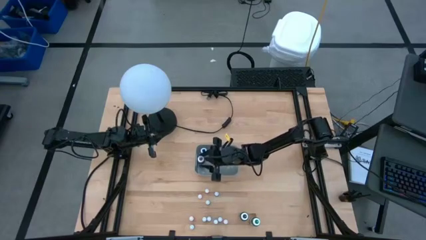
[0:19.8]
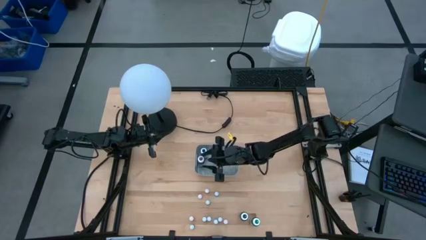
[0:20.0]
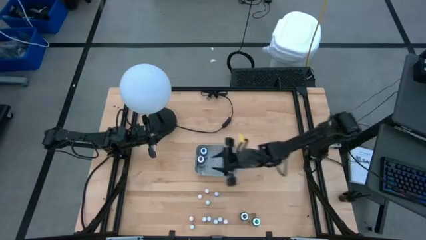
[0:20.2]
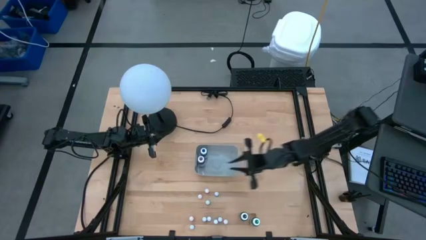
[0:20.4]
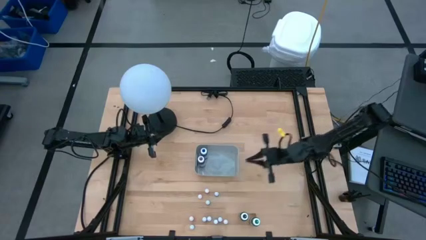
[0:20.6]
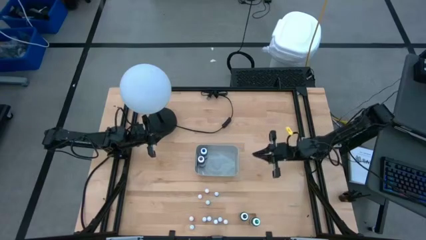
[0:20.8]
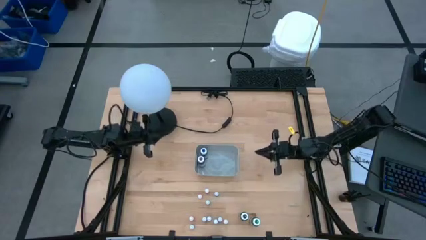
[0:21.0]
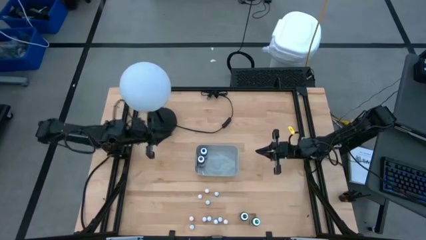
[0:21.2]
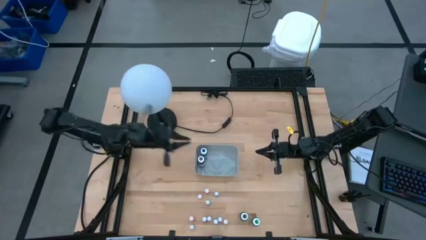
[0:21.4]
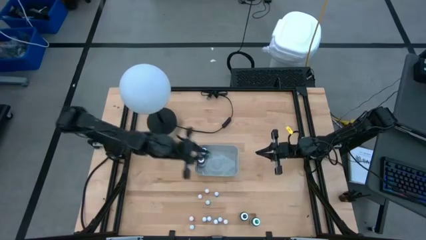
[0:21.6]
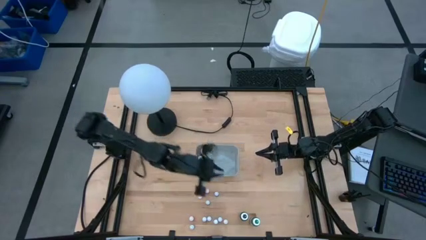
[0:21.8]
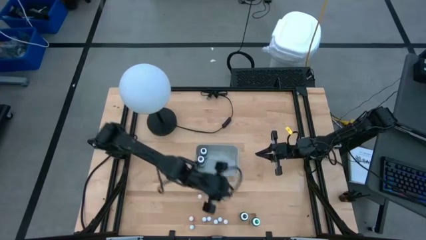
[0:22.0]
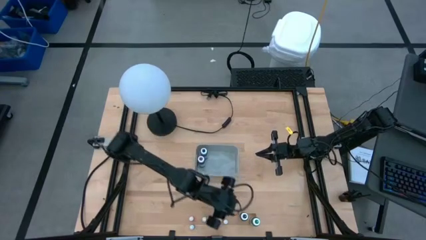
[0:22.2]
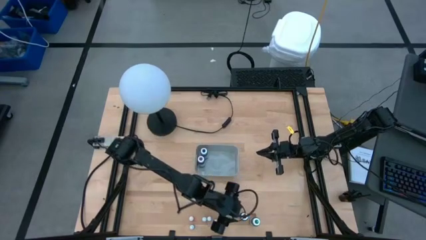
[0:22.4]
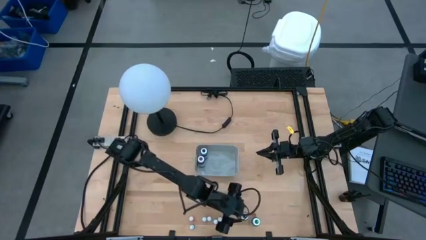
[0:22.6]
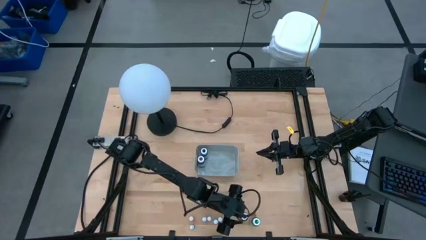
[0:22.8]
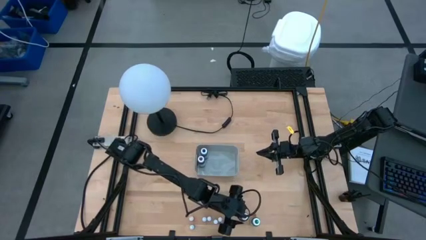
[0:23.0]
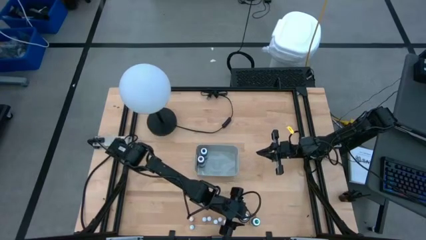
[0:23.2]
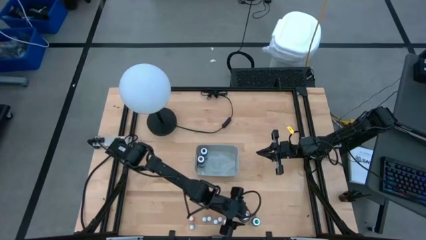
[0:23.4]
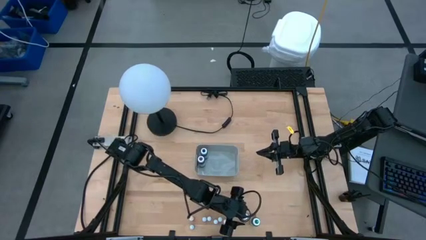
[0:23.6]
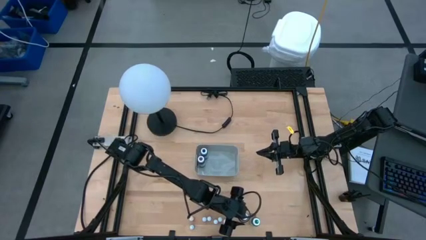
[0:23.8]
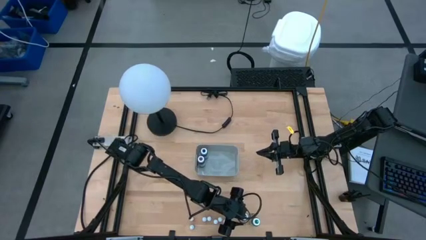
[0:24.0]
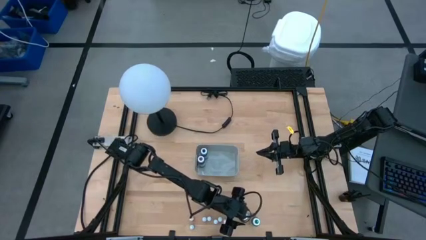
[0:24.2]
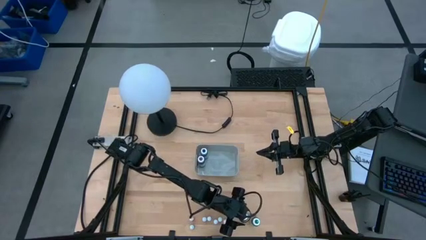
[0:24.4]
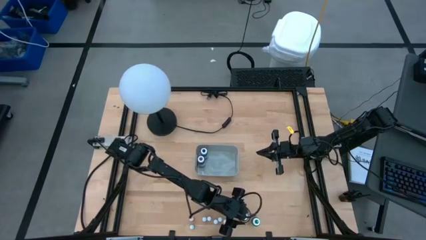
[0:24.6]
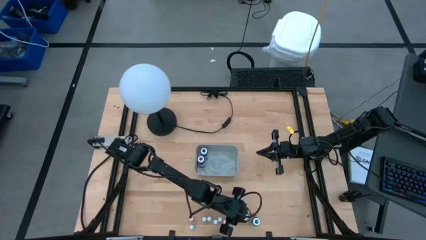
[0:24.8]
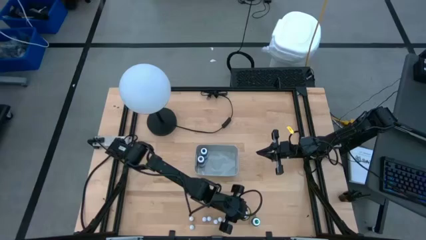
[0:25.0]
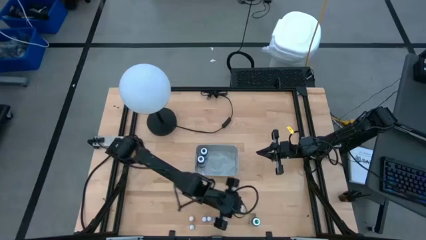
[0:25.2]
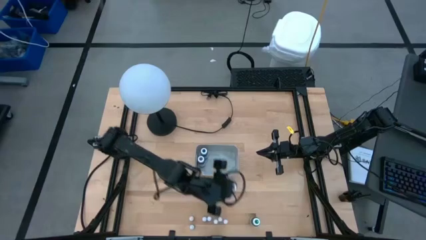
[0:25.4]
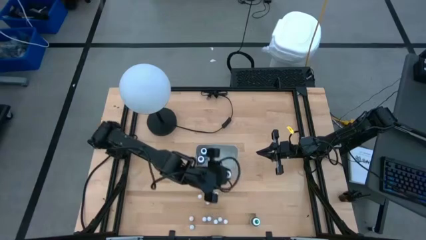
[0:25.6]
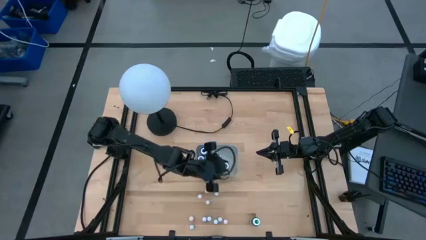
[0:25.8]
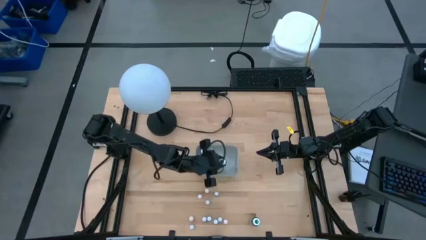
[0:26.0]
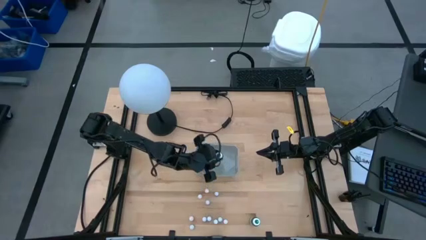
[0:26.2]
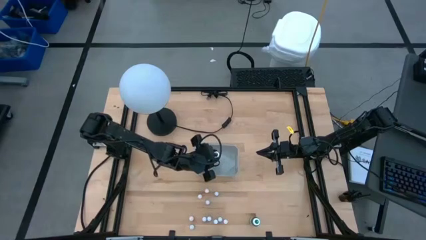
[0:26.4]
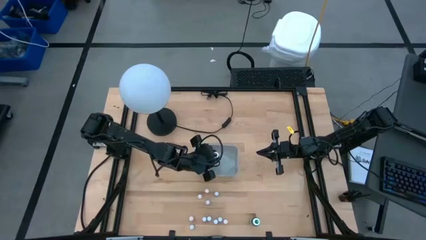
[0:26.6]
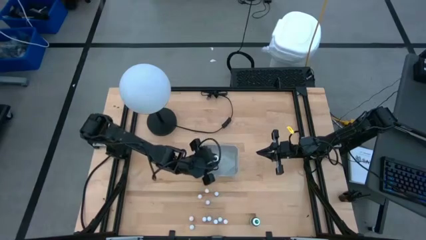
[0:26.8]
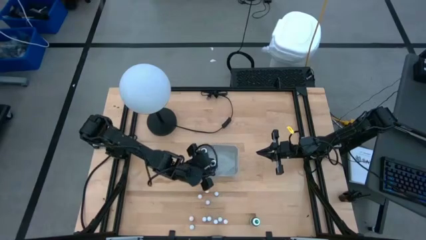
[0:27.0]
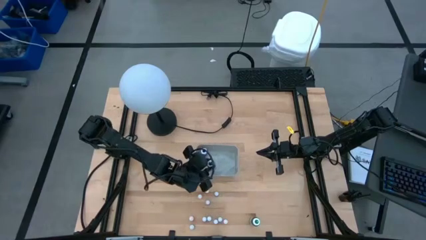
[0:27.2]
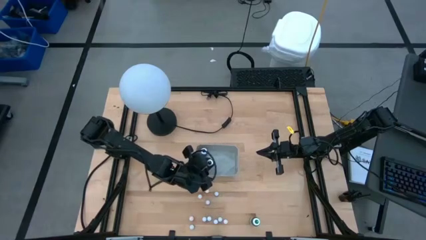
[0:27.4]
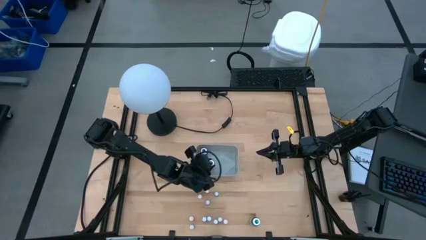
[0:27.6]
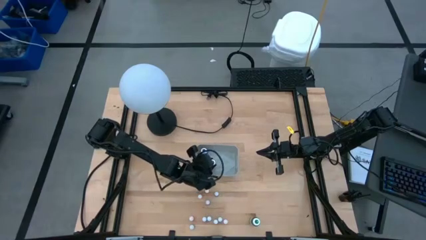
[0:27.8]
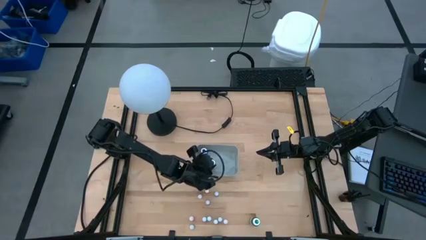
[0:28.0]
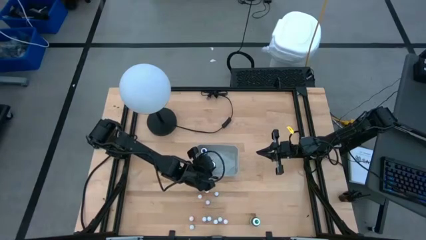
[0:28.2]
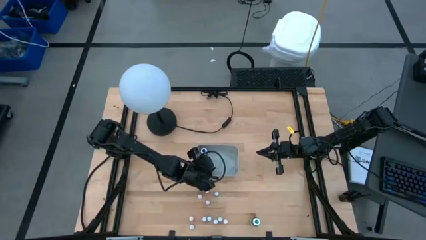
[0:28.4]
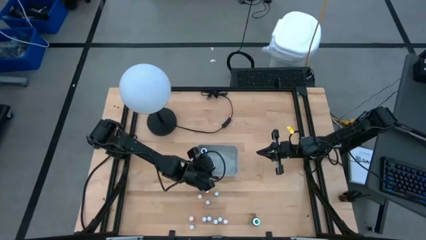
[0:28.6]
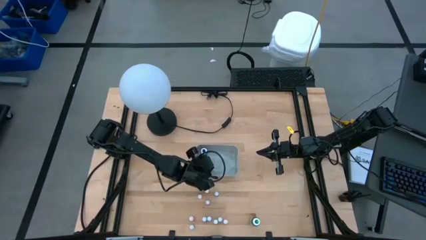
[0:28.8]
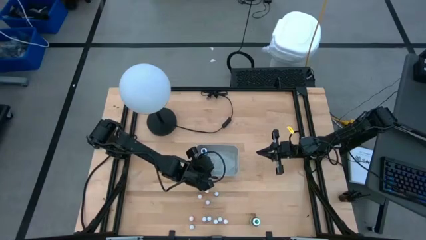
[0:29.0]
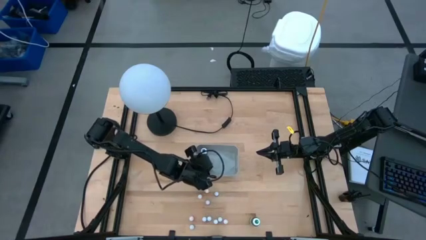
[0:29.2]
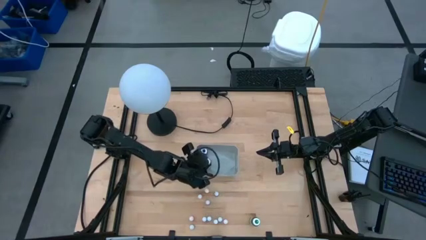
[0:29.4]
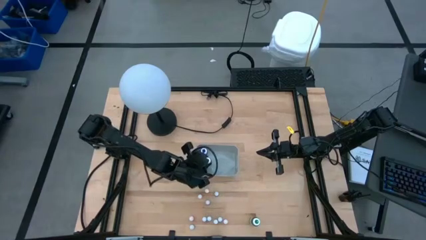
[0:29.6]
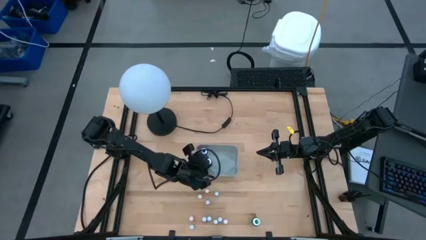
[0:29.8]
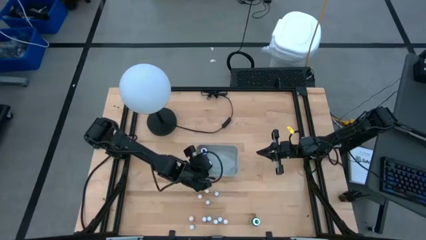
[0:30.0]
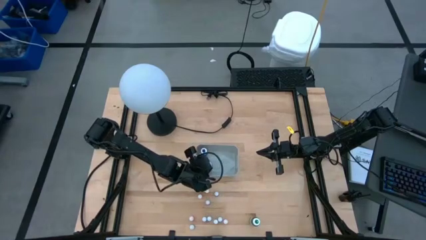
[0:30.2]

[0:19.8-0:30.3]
Task: Pick & Place food coloring
Put the big black food coloring bottle into the gray bin
